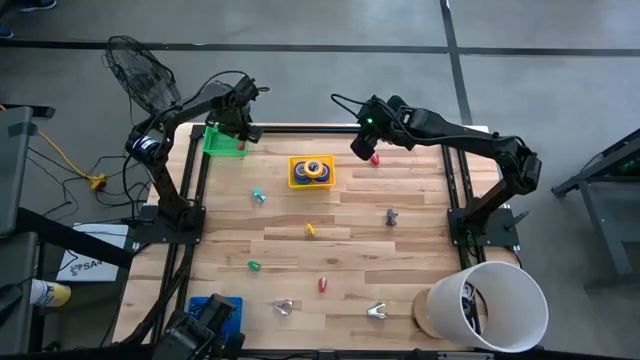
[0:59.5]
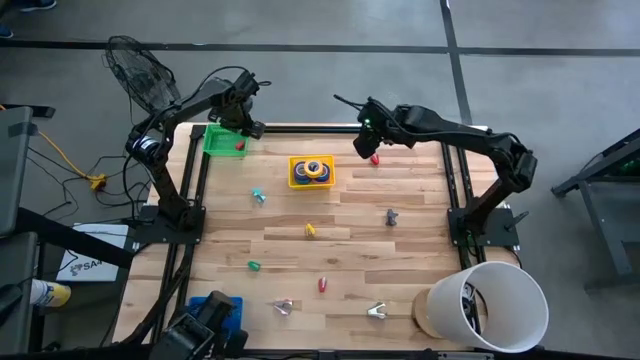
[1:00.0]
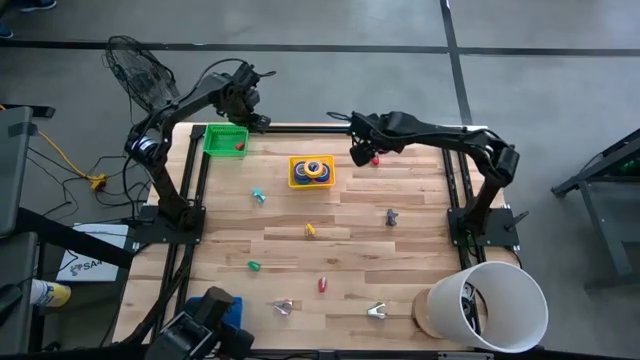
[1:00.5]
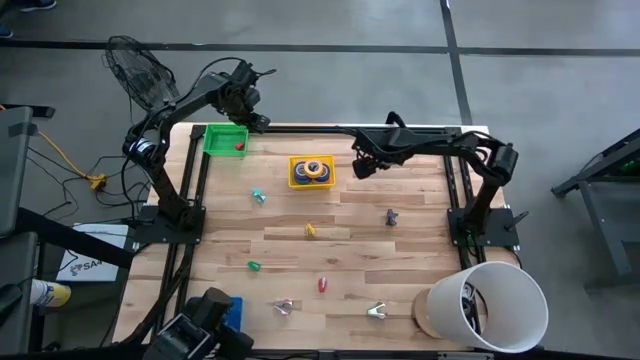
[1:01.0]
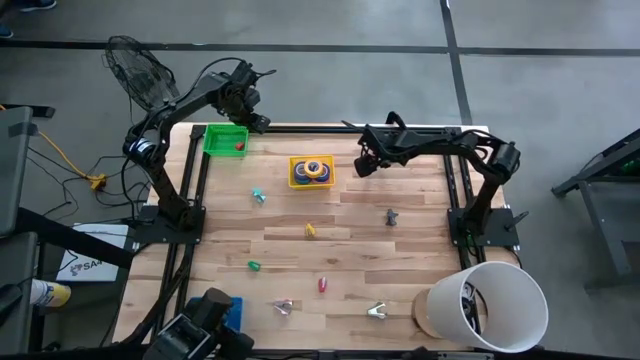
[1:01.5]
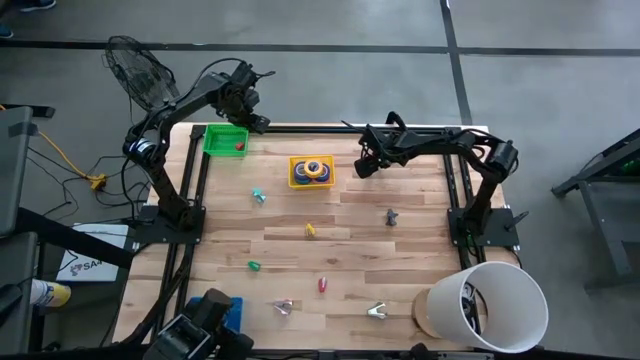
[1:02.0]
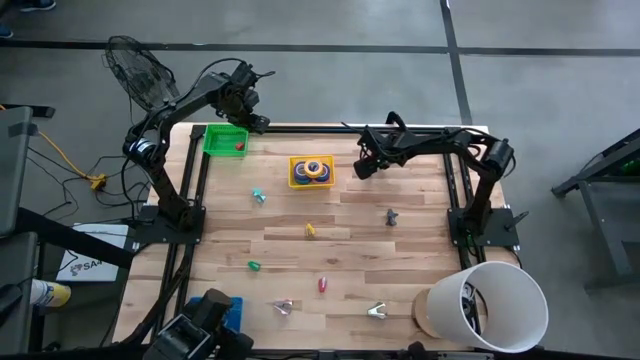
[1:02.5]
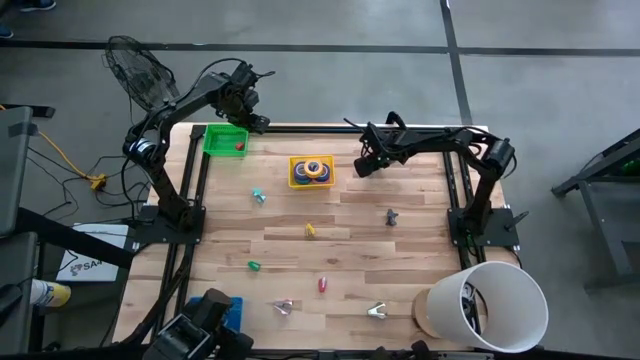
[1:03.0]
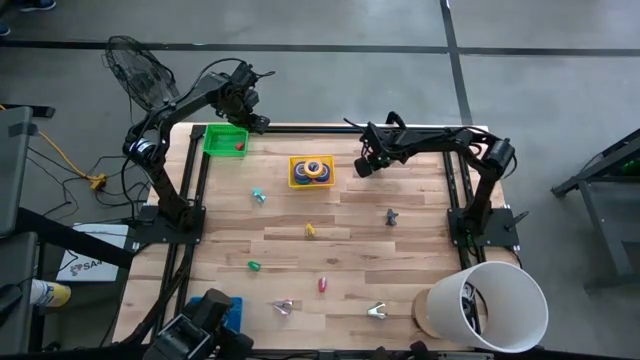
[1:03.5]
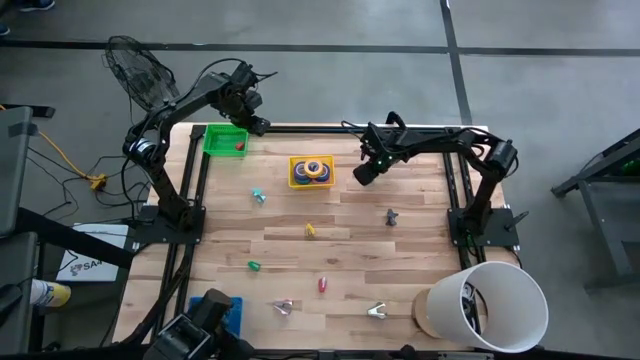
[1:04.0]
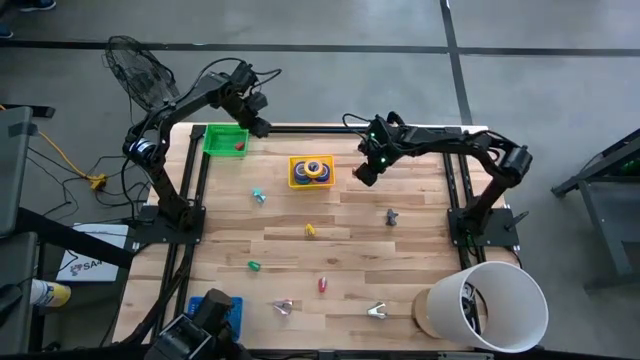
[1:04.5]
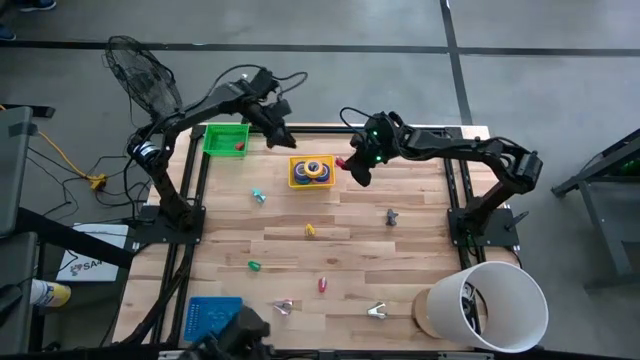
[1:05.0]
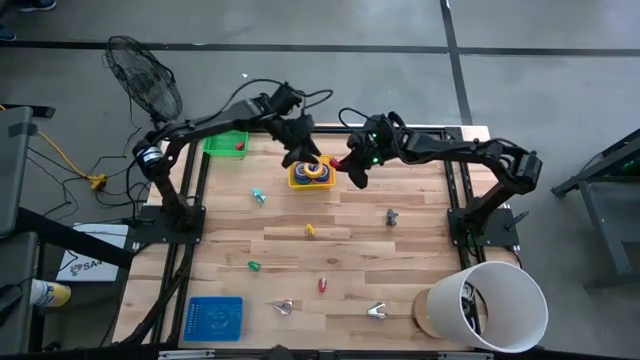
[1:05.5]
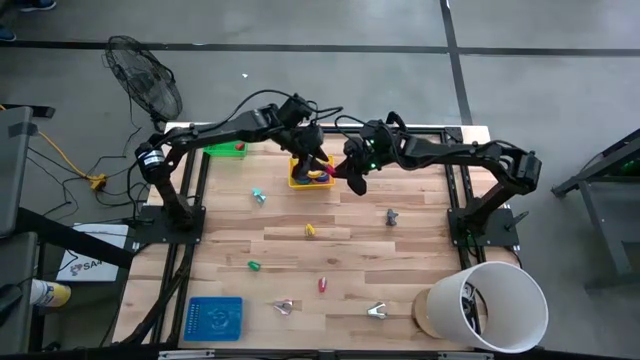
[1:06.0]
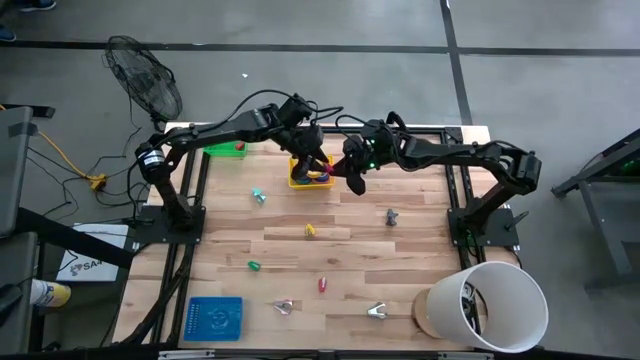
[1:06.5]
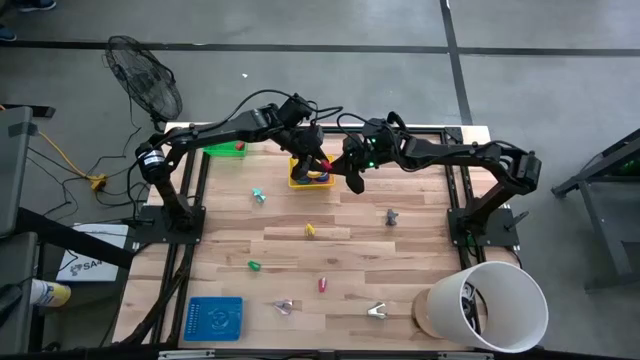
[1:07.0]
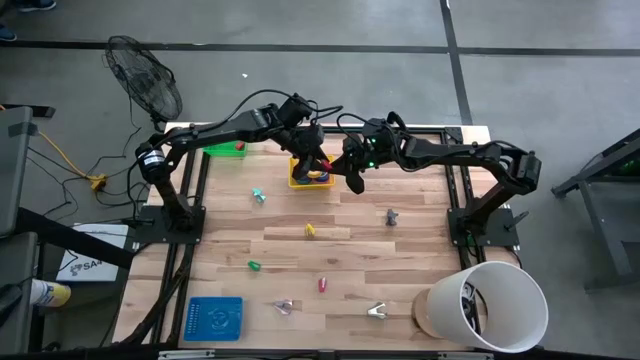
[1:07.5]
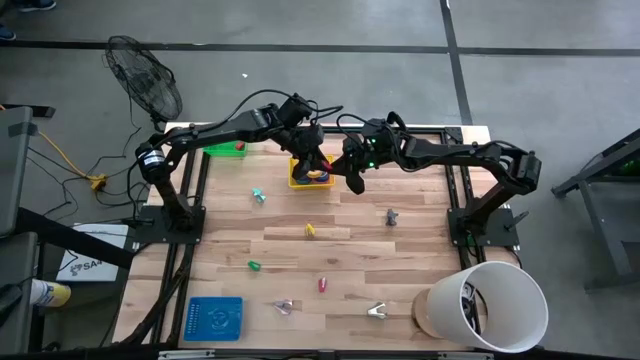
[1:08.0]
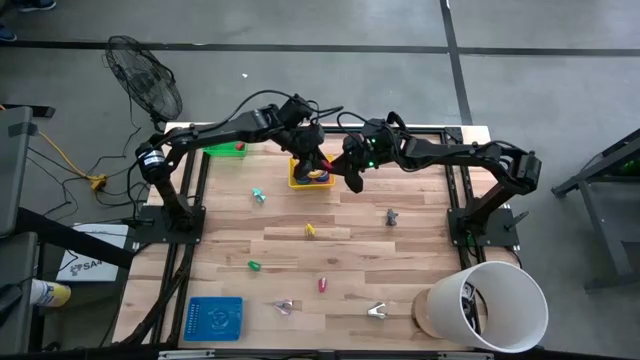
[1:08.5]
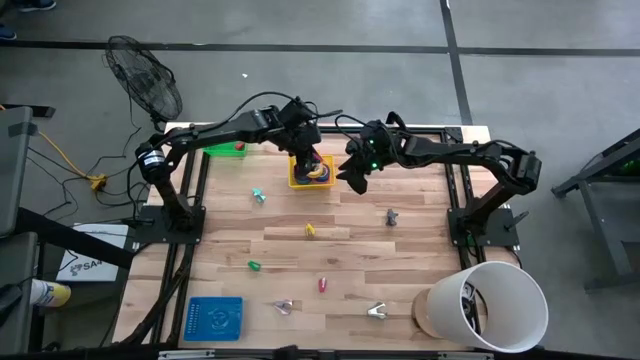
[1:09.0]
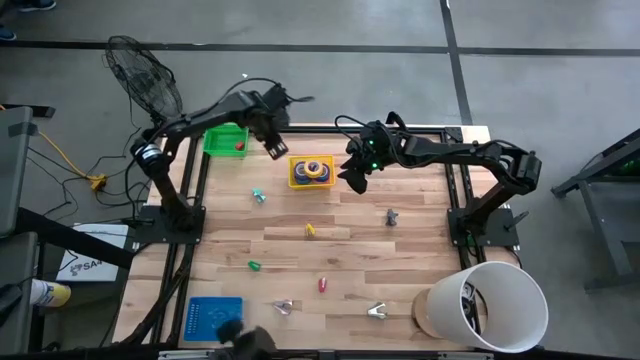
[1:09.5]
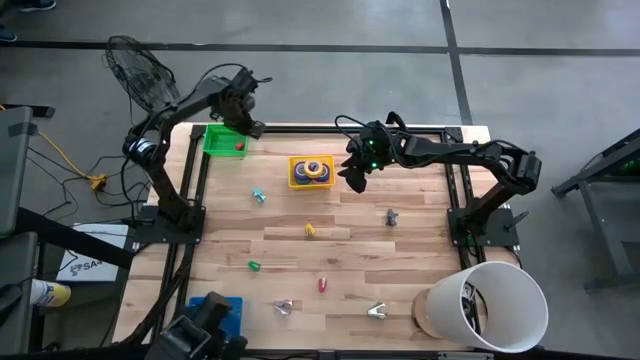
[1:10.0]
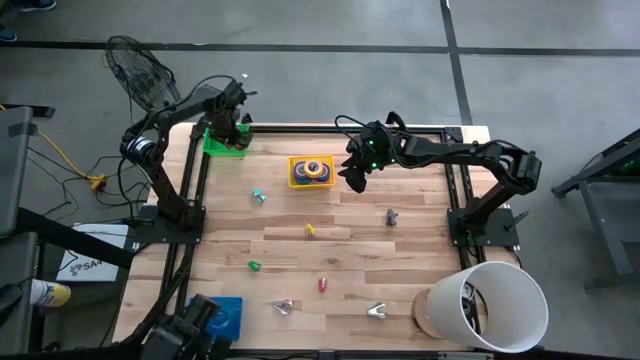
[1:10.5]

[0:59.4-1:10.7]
Task: Pick and place Stapler, Stapler remover, tape
Put the red stapler into the green bin

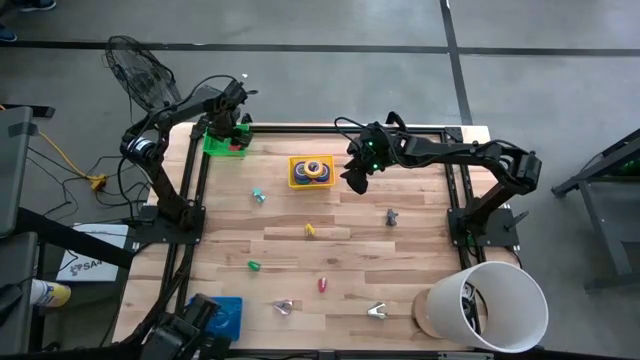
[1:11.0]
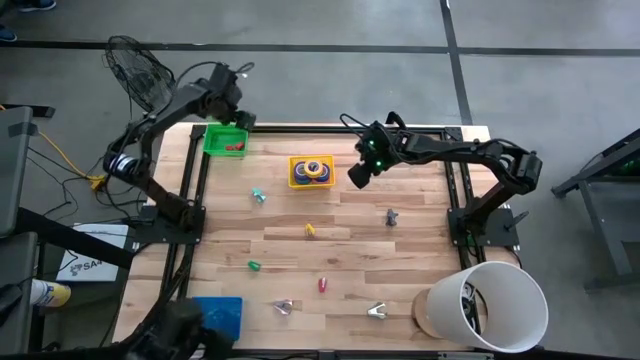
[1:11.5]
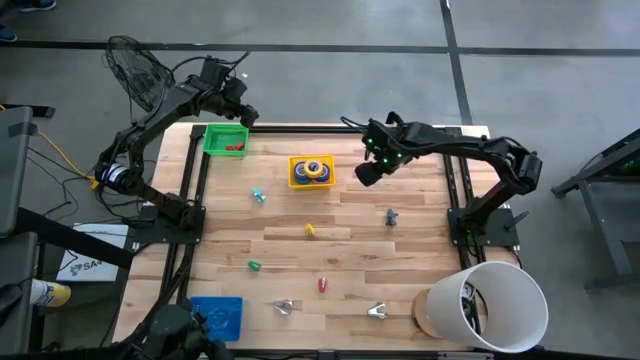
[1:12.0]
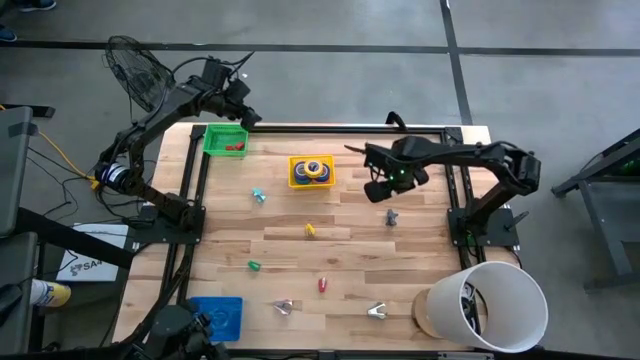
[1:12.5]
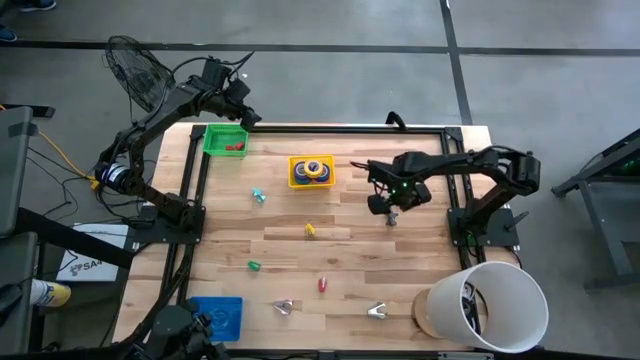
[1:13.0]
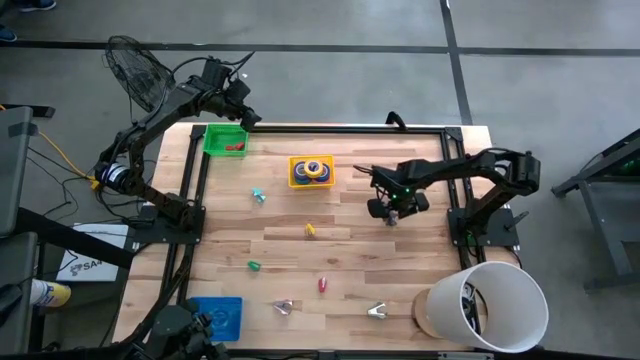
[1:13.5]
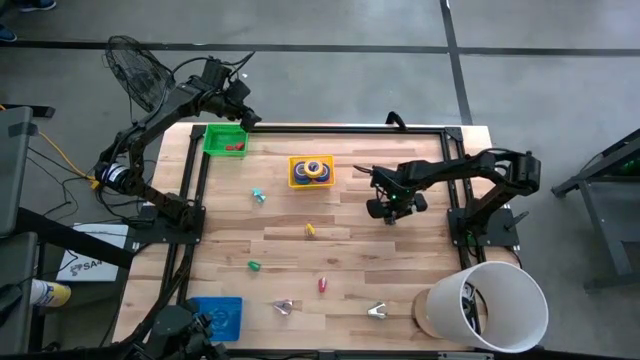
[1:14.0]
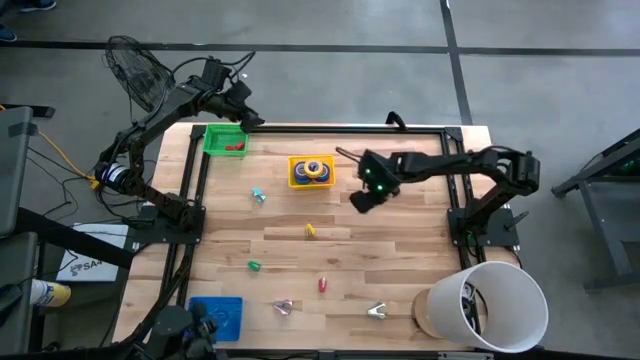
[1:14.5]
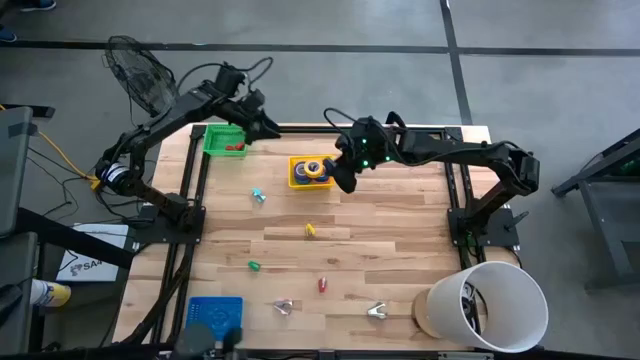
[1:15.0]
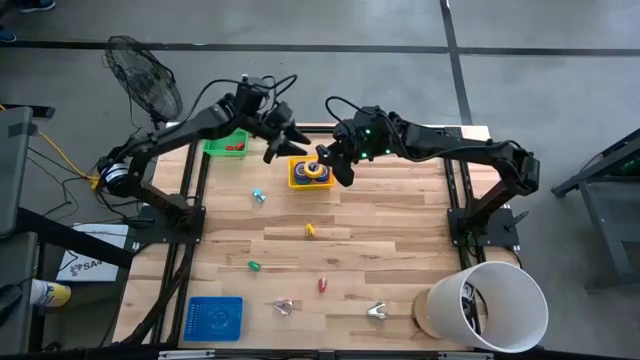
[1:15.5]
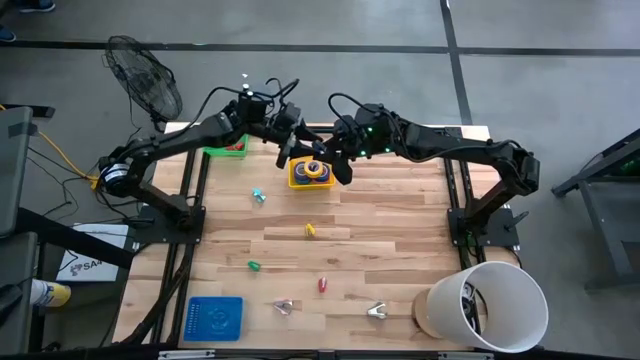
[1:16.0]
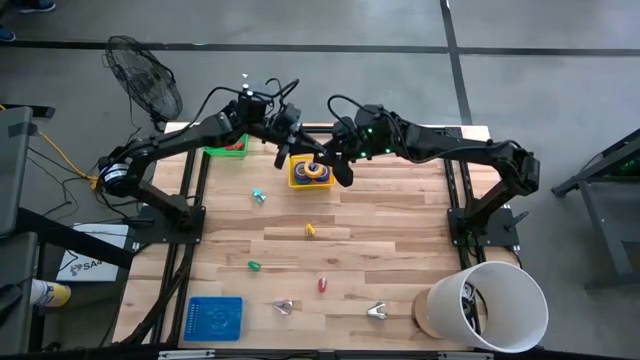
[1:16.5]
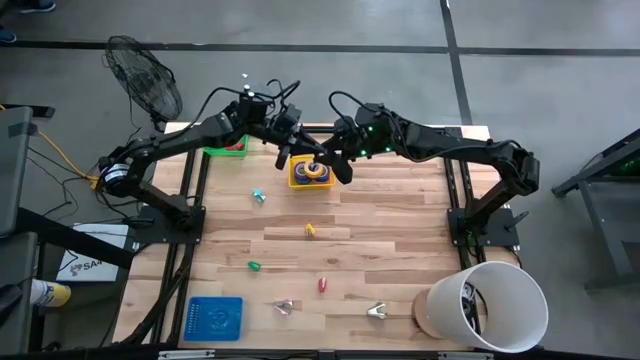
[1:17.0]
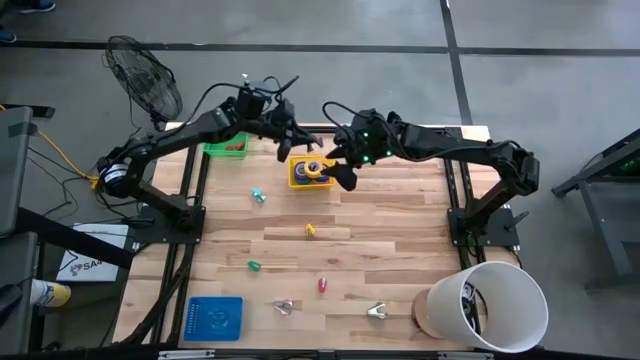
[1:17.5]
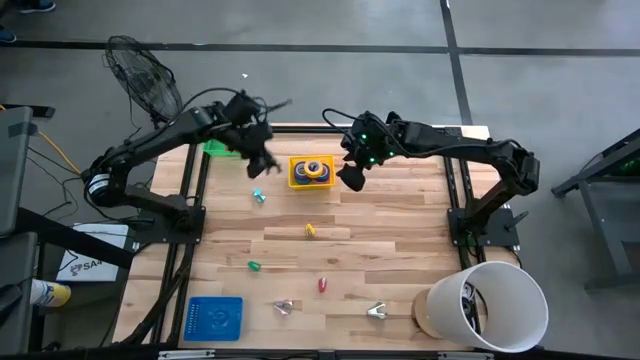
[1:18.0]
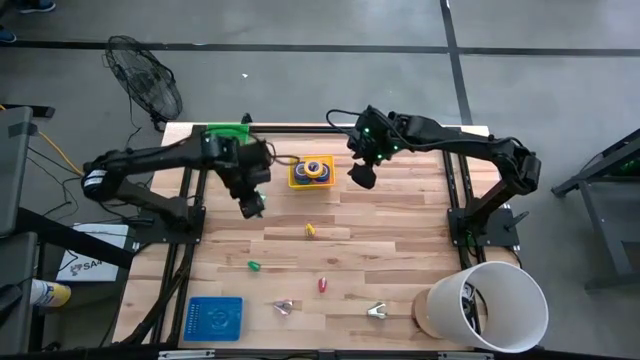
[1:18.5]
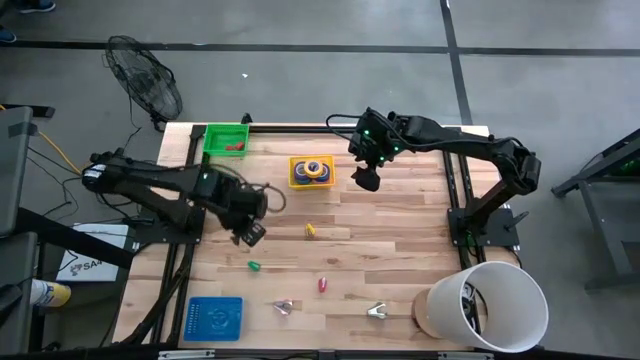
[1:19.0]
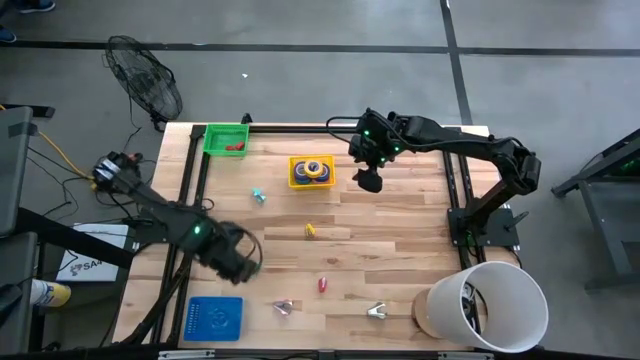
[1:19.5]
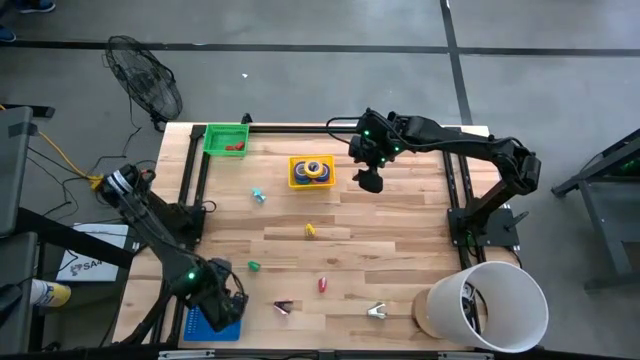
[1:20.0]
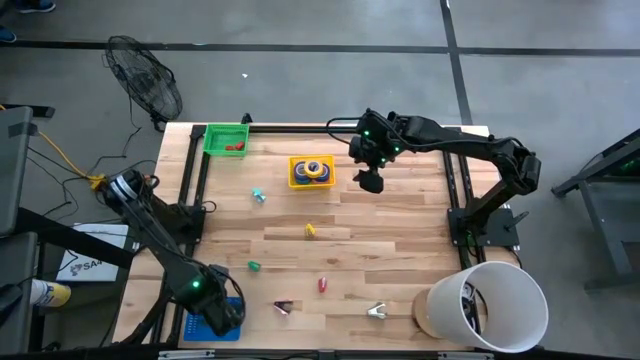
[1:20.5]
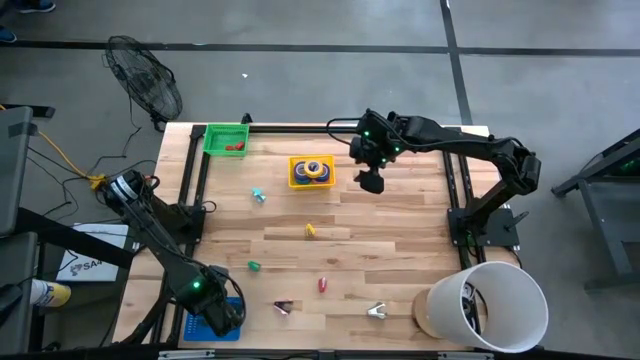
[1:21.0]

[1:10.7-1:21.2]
Put the black staple remover into the blue bin
